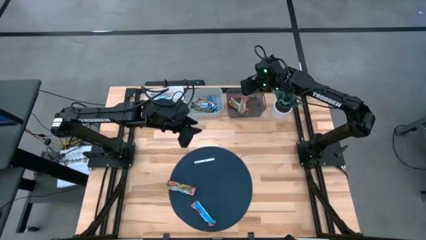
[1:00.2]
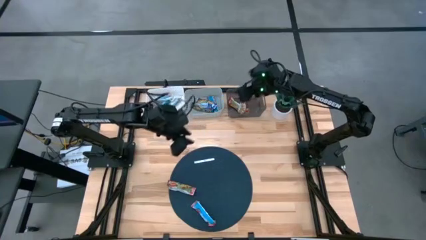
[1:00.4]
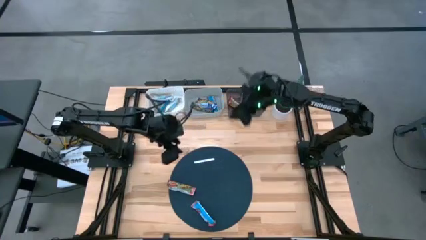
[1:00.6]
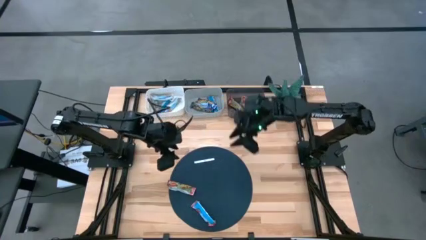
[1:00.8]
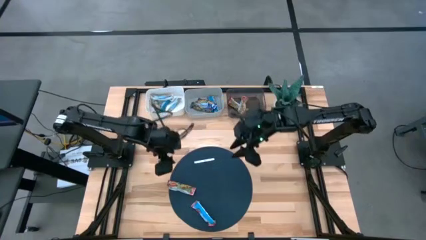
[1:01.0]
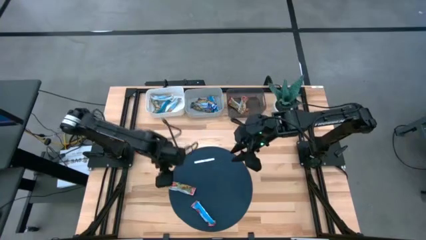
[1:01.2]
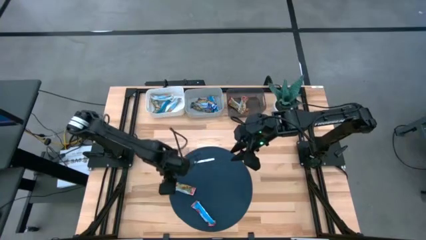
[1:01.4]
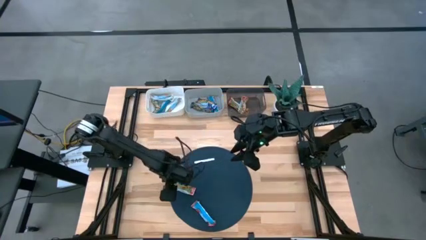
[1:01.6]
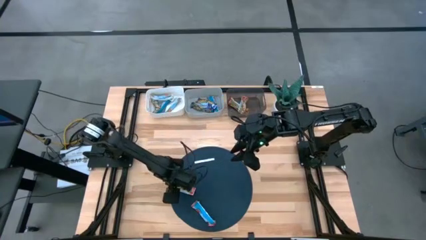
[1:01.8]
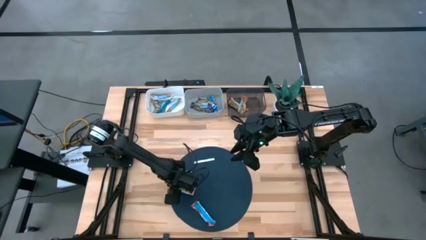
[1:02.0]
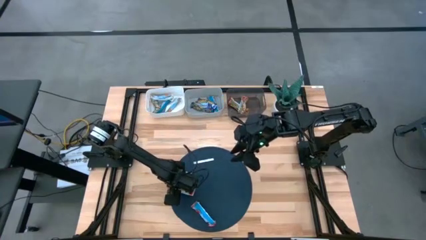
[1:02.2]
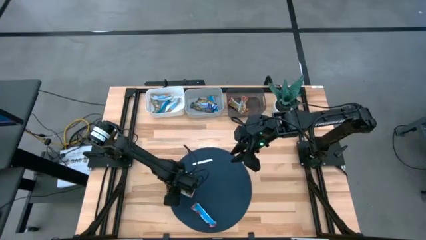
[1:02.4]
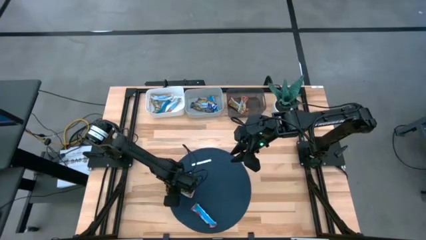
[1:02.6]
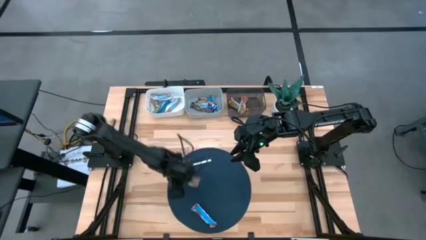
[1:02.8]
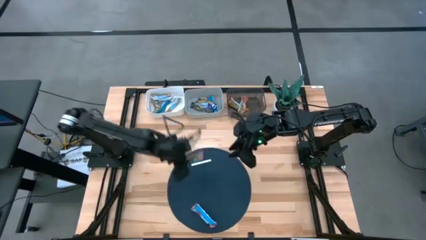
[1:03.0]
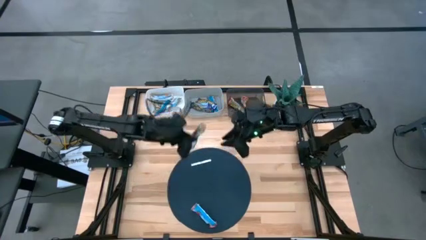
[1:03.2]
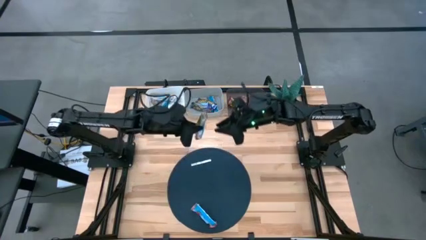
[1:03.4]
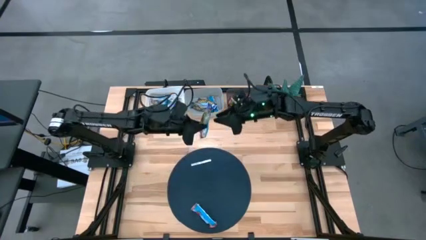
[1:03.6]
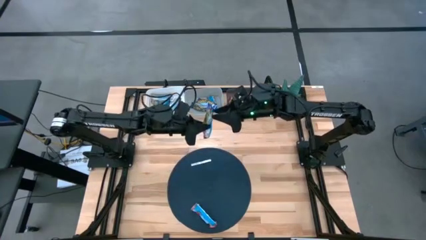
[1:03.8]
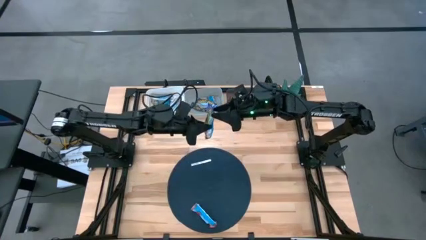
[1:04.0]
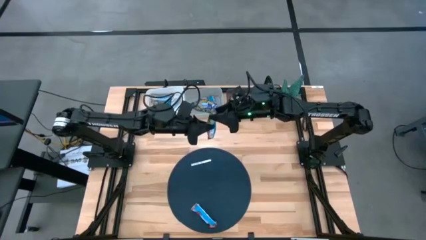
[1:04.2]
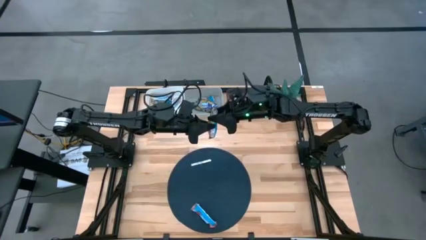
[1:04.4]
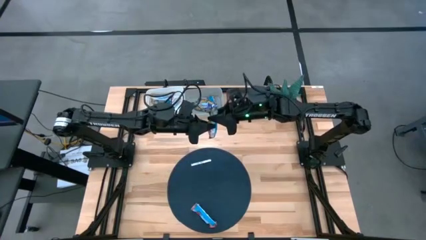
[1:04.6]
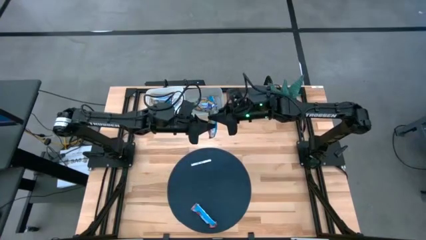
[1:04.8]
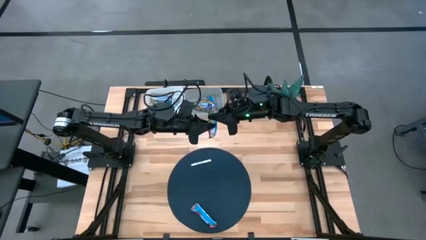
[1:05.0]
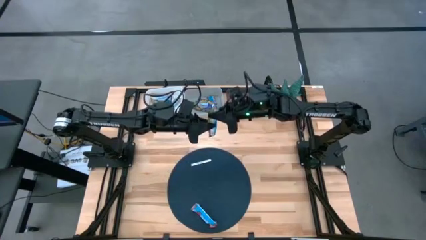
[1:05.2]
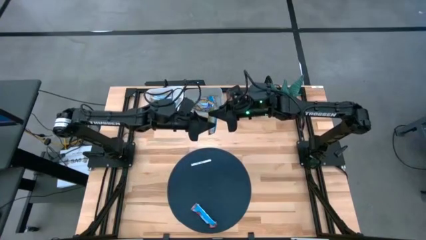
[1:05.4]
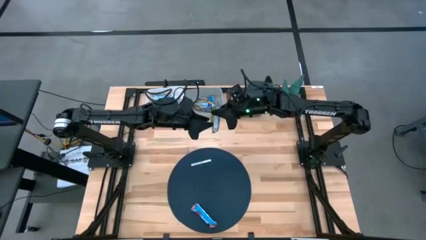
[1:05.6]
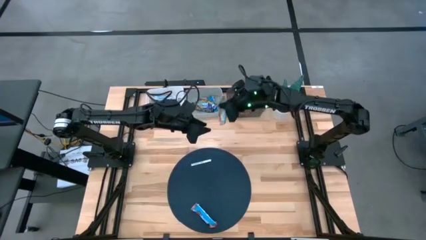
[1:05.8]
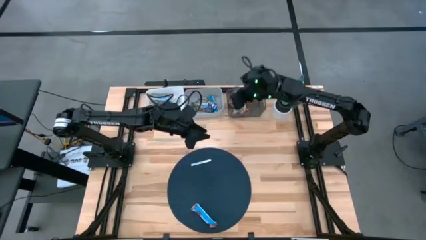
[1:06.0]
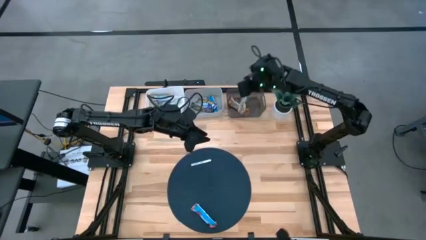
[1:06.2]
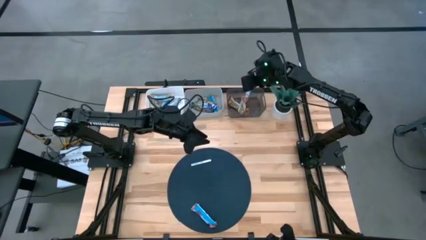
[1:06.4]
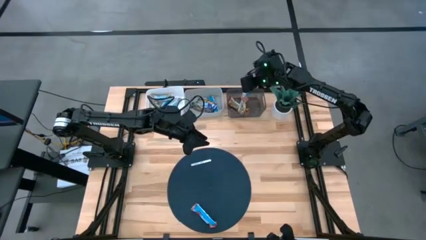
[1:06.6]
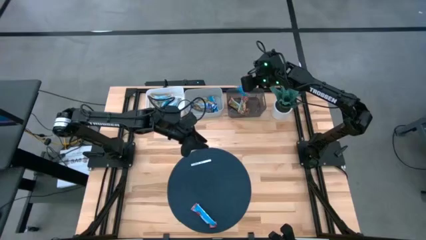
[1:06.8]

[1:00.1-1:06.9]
Task: Pick and place Granola Bars by type
Put the red granola bar into the black bin

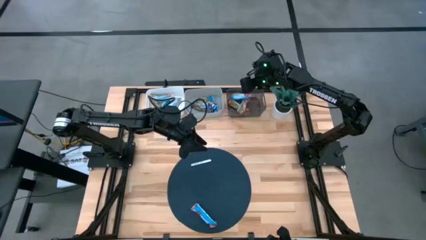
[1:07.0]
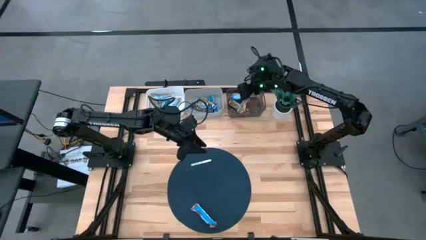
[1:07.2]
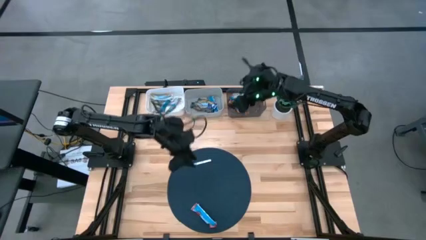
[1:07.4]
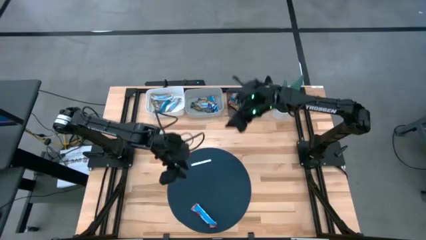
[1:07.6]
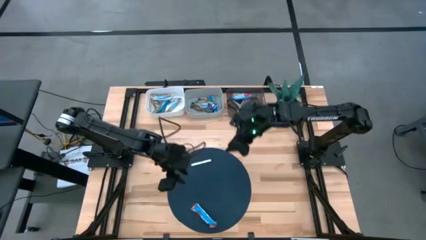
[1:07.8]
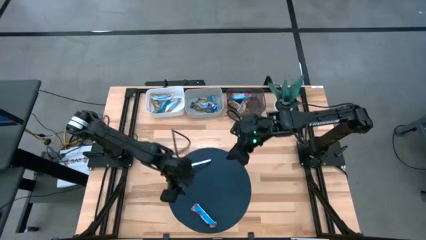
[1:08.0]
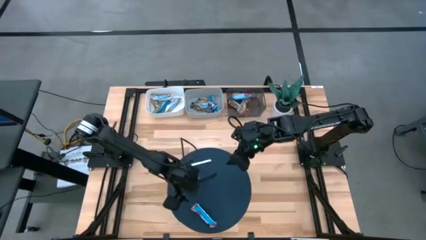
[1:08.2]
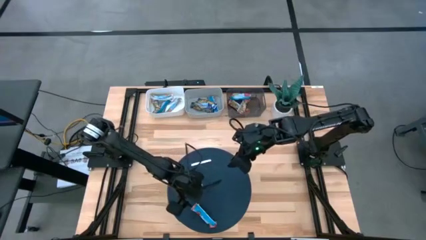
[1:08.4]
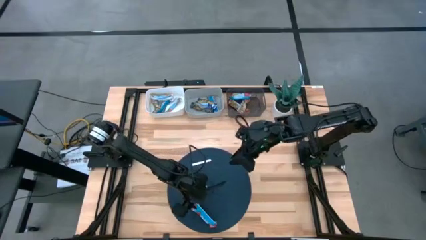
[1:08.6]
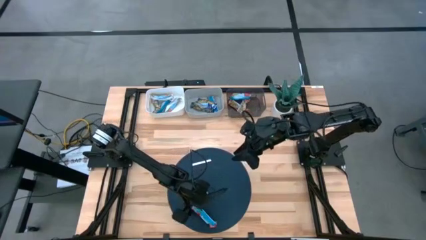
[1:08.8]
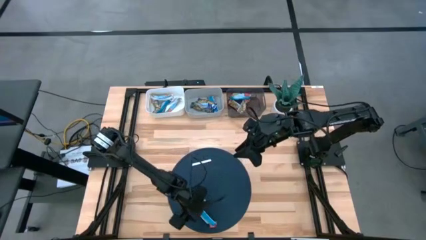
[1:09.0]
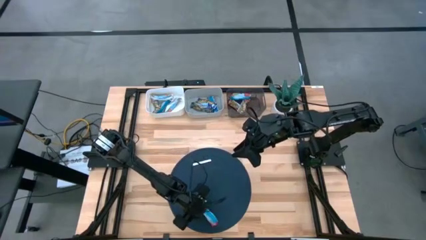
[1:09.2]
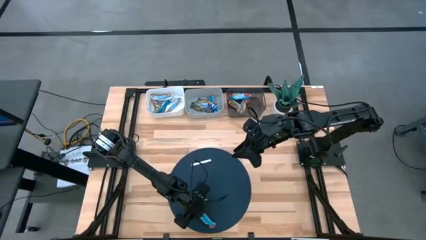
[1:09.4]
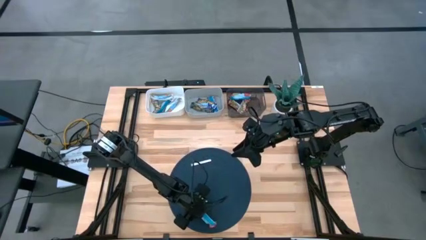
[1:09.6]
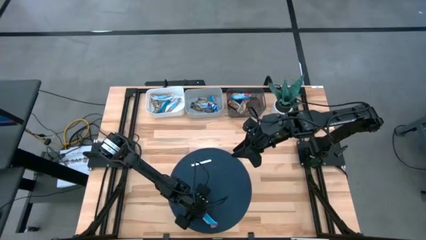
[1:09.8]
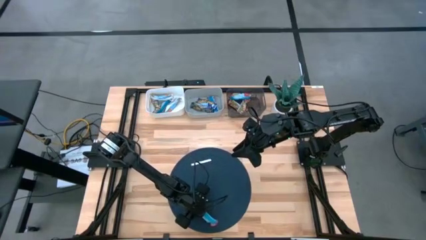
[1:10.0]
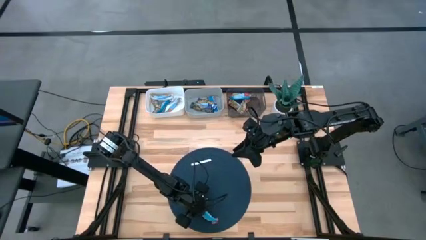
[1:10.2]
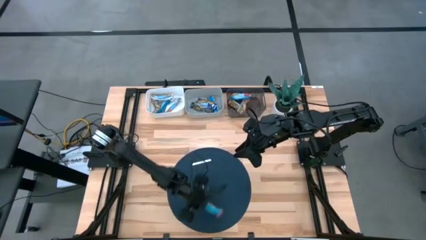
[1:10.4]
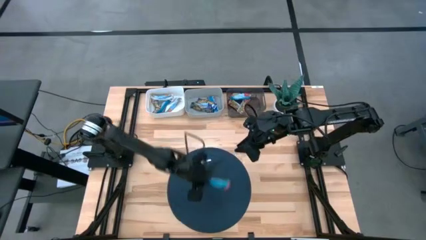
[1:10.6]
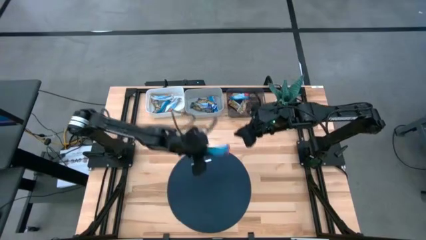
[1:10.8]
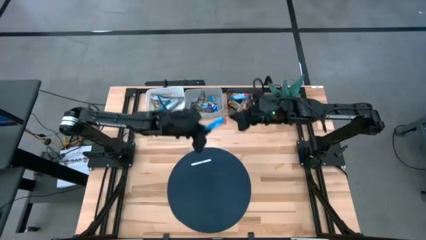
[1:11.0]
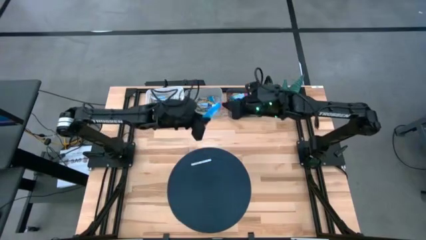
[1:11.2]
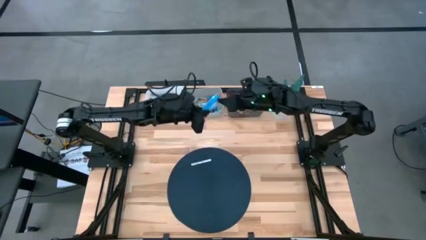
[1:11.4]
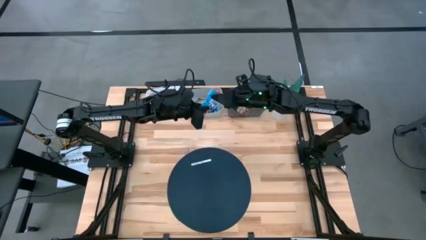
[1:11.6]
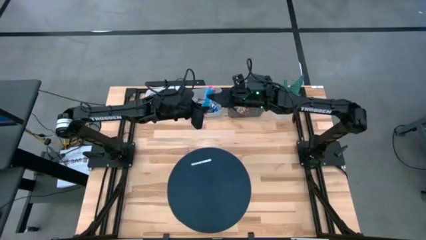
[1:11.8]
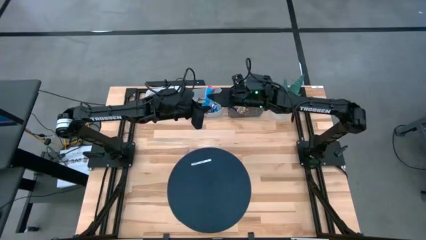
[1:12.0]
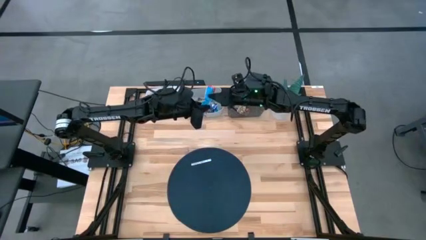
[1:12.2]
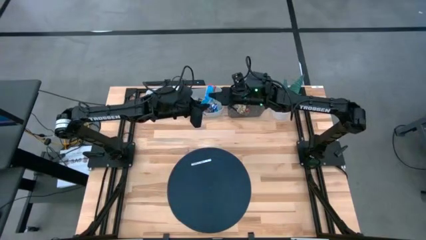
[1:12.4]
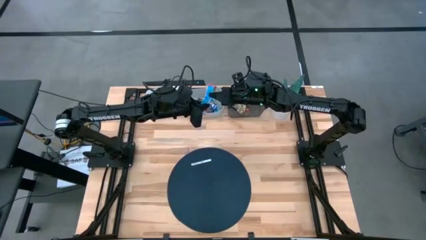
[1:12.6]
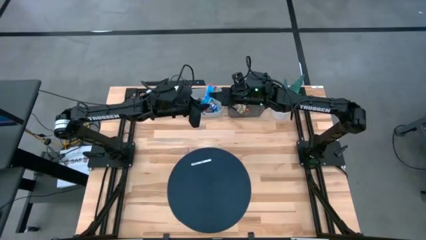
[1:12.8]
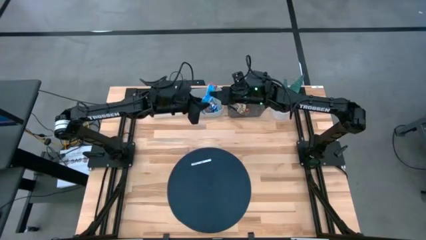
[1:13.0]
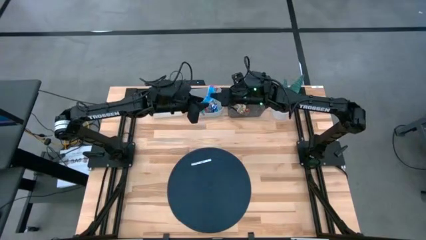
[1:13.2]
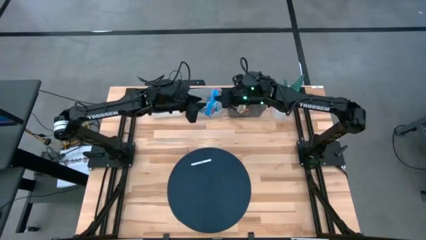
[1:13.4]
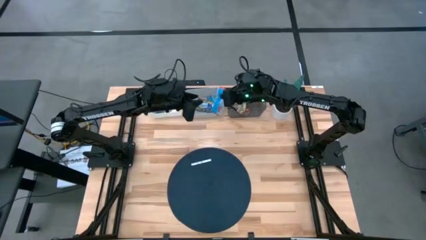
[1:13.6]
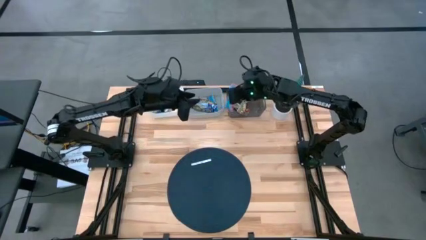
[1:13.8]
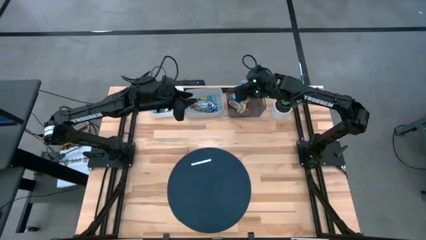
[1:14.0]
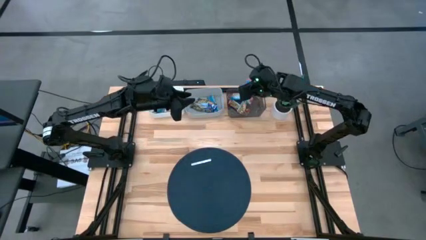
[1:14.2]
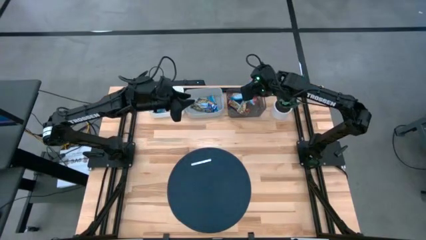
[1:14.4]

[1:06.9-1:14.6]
Put the red granola bar into the black bin

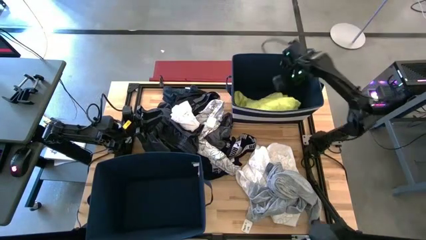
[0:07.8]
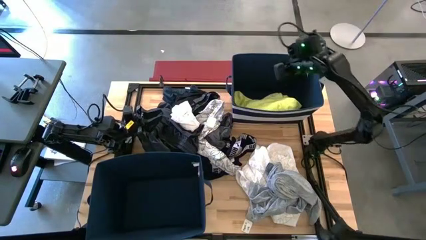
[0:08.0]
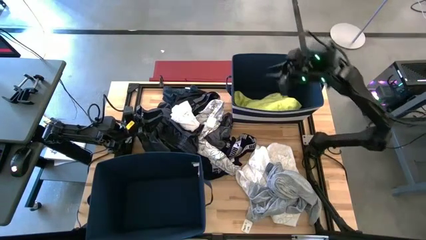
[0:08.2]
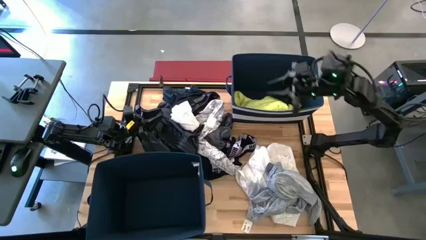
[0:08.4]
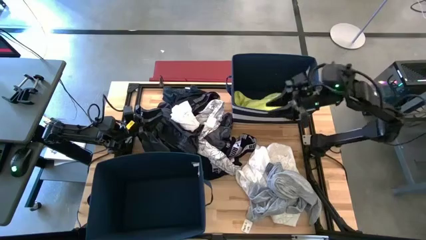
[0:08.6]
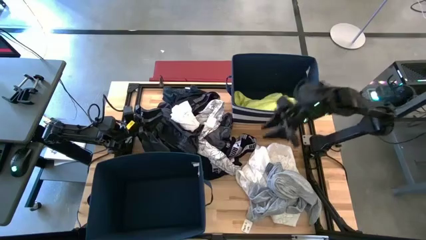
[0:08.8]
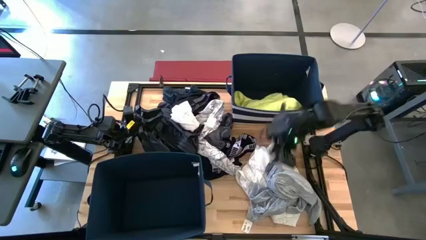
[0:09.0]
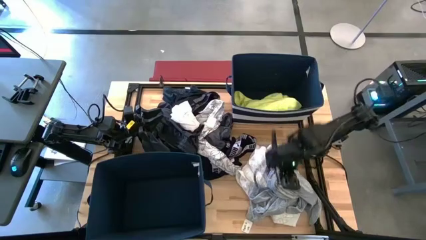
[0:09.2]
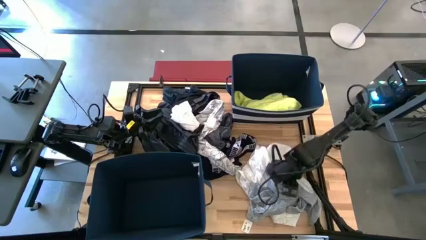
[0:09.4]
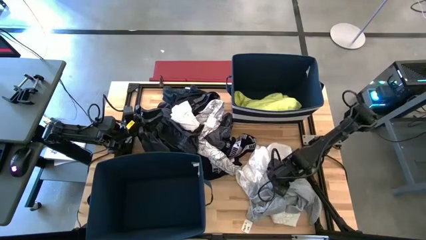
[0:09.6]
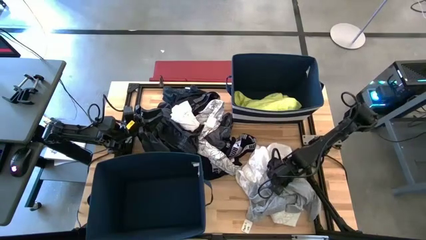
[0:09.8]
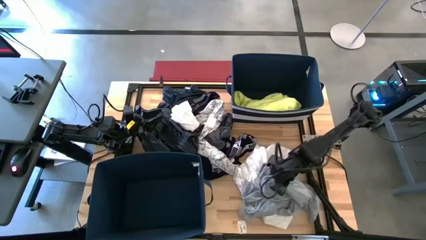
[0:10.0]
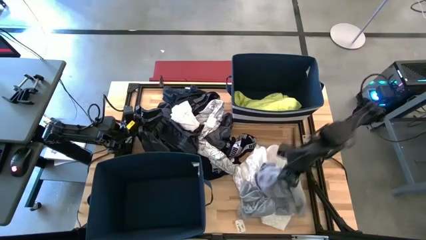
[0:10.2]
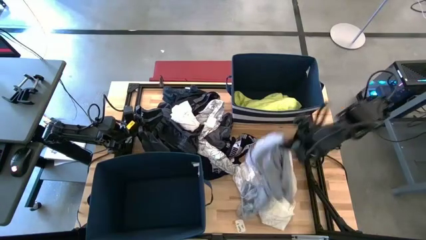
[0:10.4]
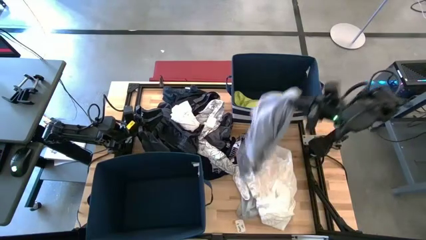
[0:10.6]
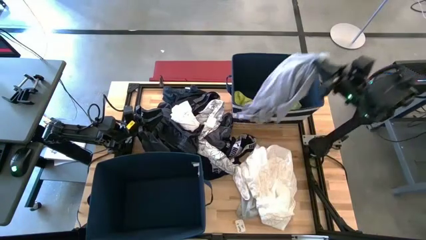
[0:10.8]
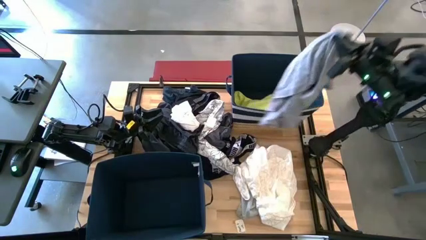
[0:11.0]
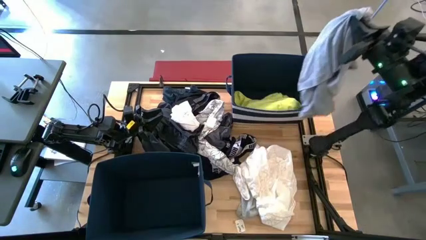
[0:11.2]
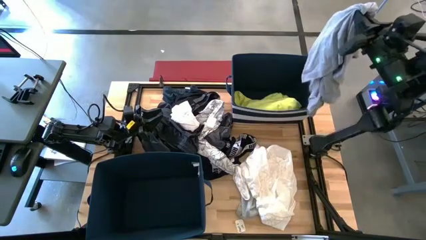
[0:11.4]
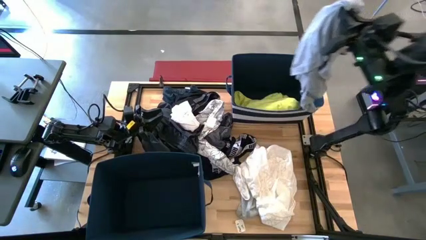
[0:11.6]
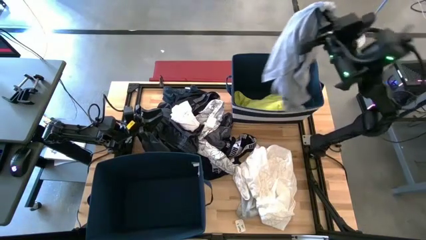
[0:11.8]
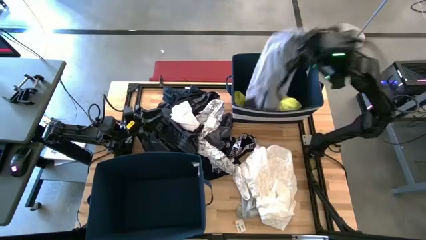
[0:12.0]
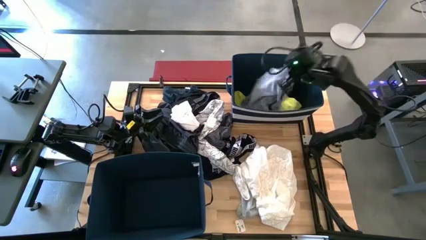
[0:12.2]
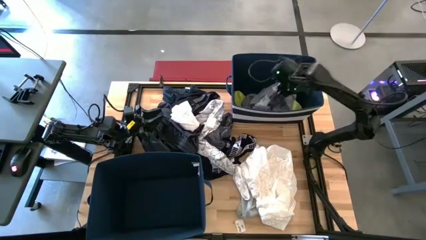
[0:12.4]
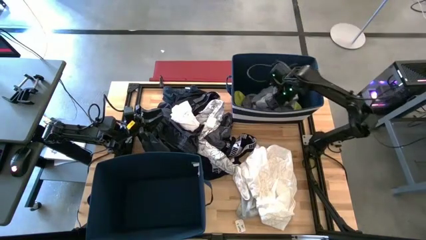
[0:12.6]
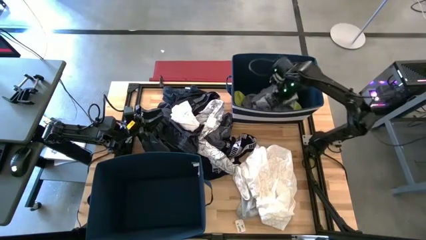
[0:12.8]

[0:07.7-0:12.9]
Task: Sort clothes
Put the light gray shirt into the top blue laundry bin
